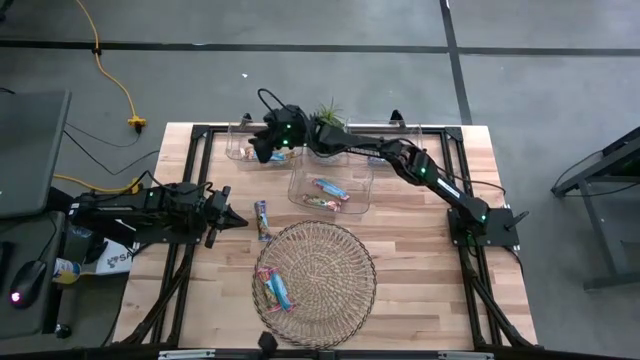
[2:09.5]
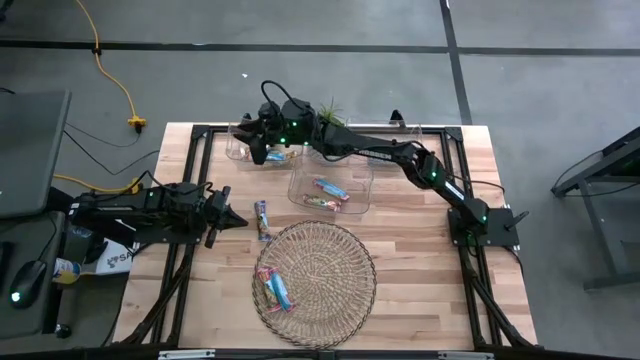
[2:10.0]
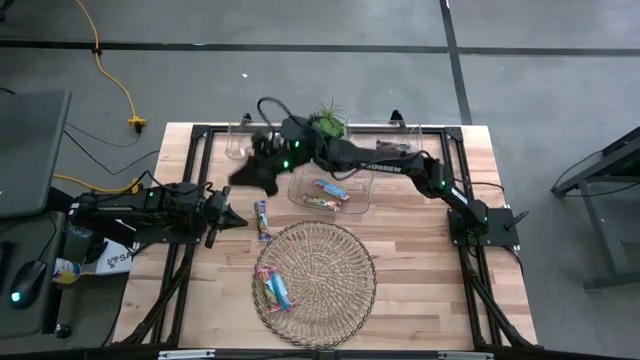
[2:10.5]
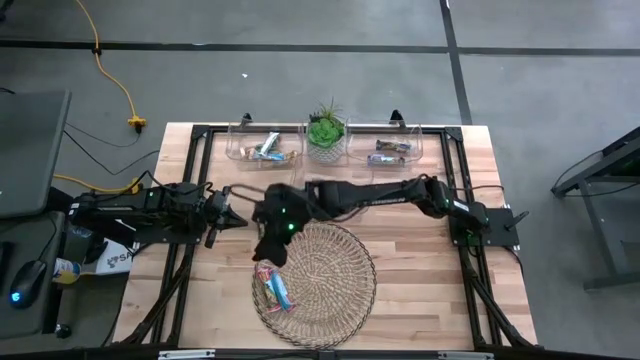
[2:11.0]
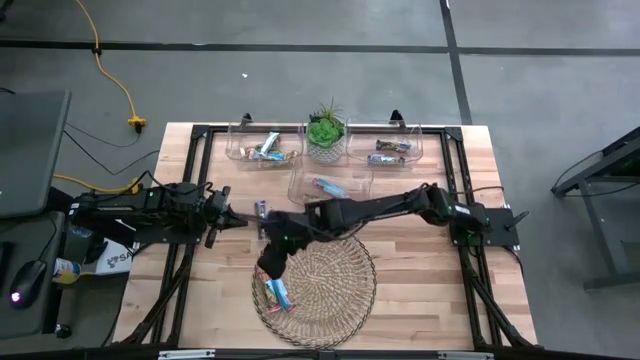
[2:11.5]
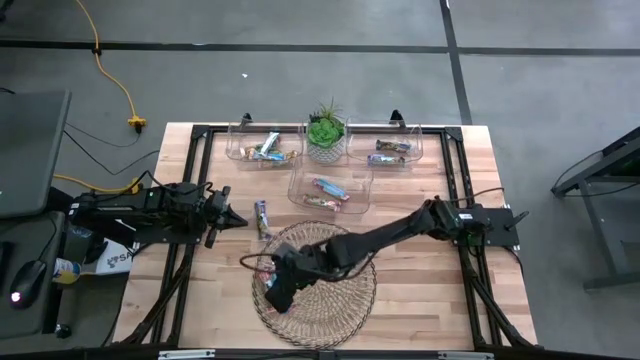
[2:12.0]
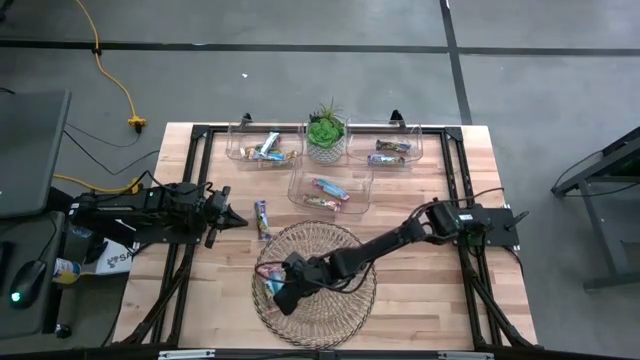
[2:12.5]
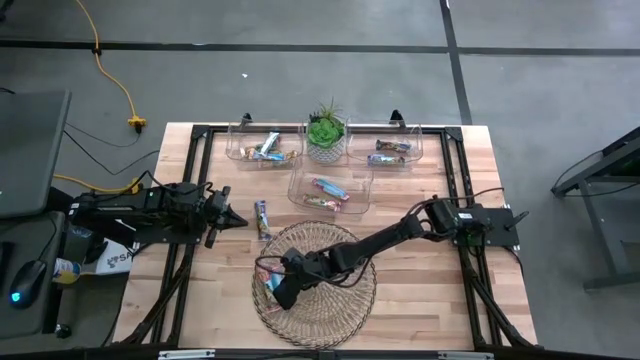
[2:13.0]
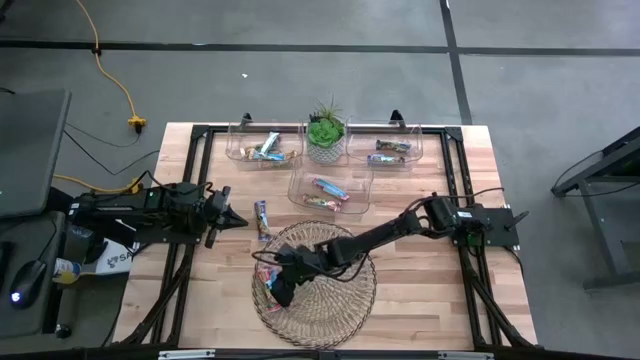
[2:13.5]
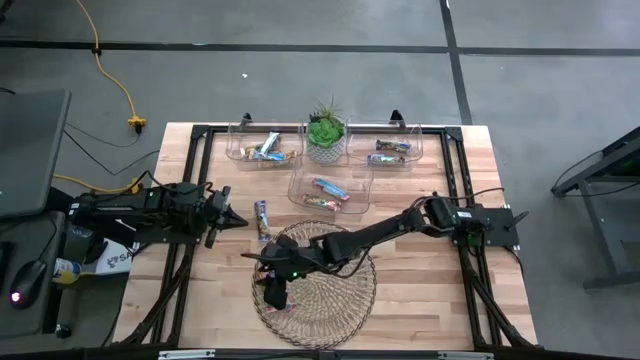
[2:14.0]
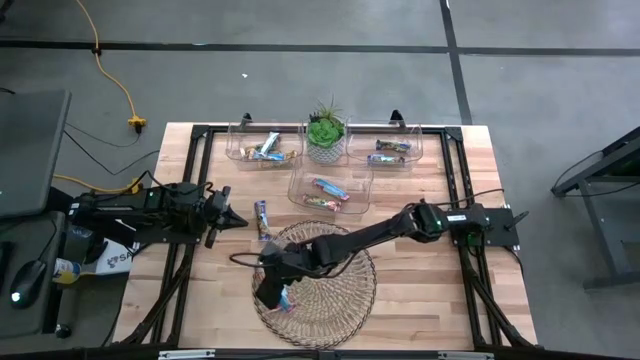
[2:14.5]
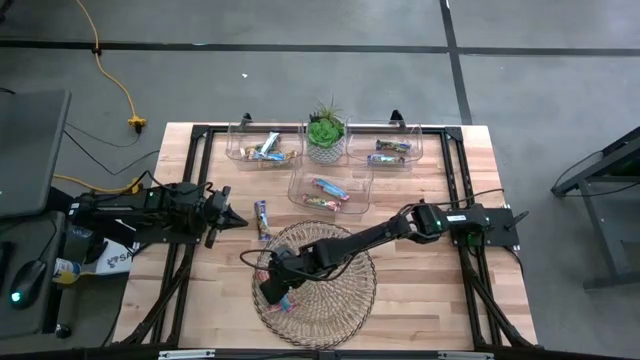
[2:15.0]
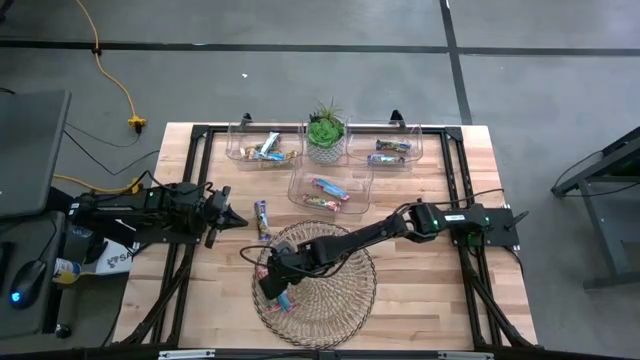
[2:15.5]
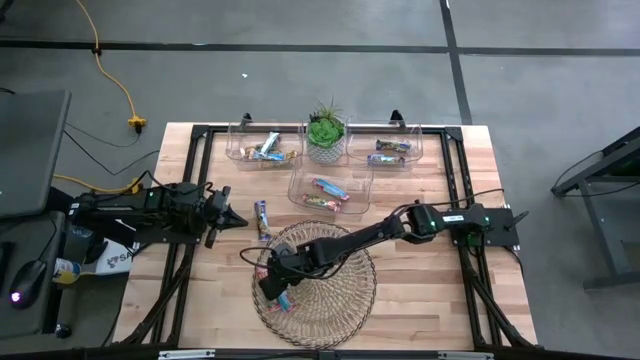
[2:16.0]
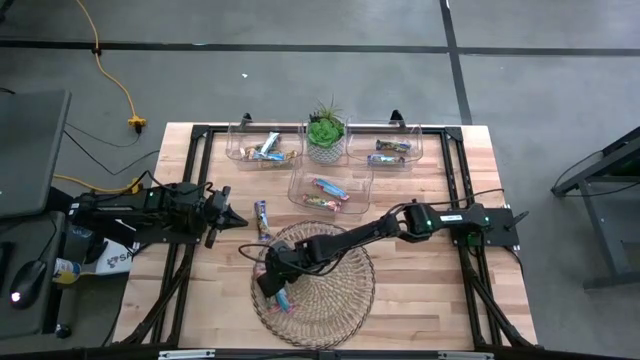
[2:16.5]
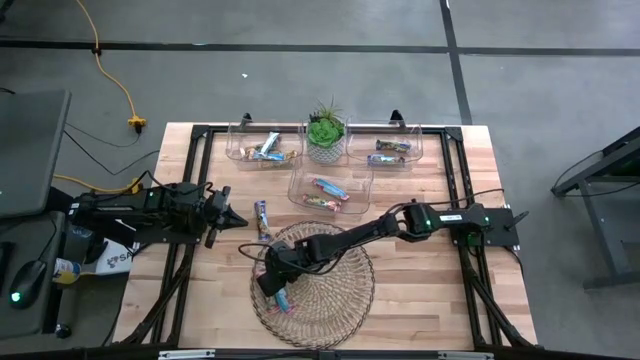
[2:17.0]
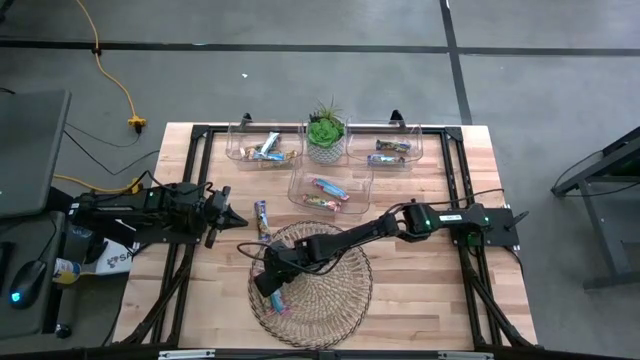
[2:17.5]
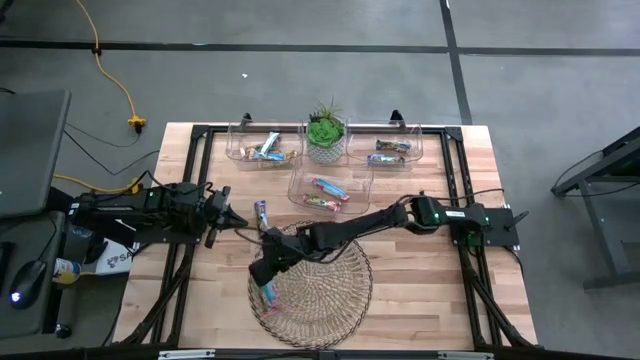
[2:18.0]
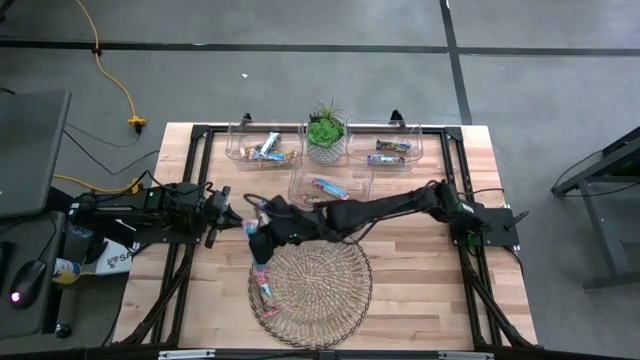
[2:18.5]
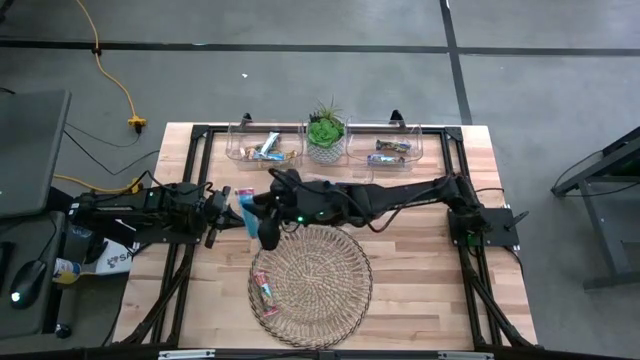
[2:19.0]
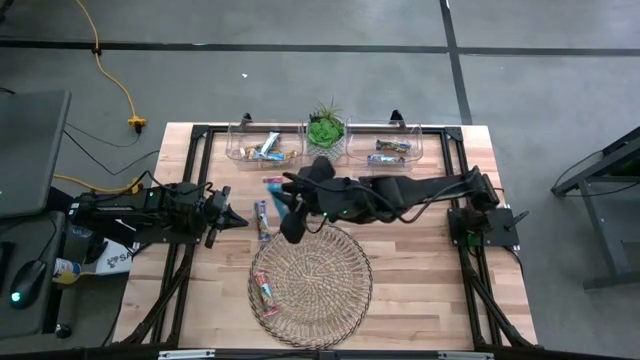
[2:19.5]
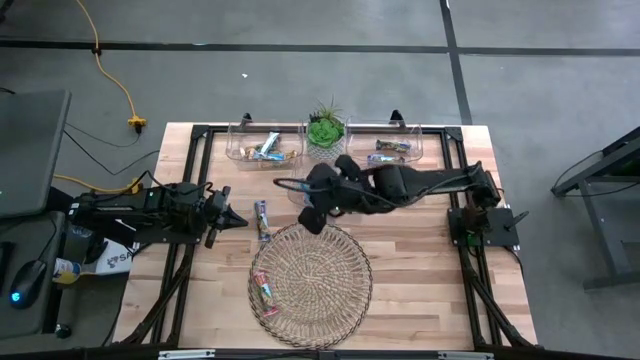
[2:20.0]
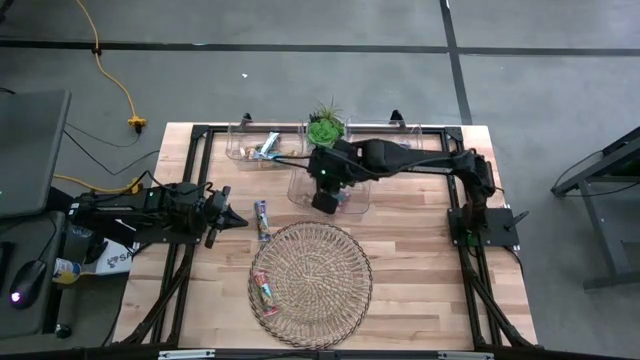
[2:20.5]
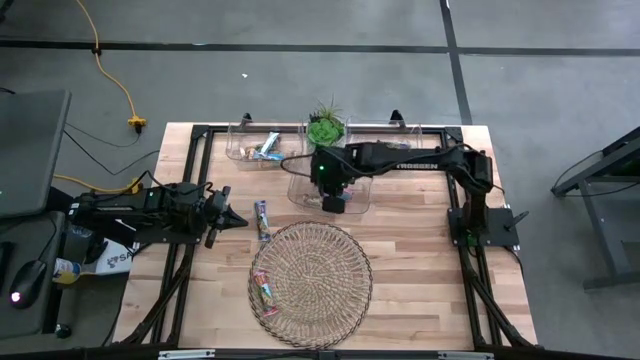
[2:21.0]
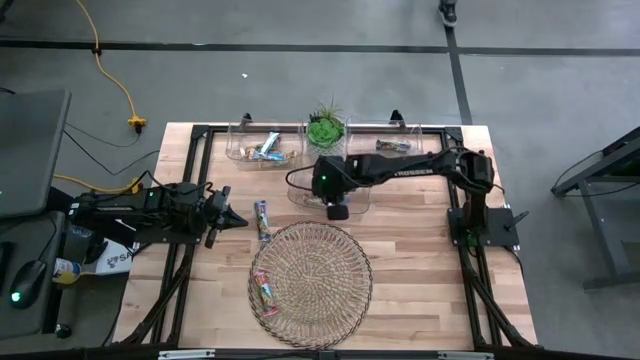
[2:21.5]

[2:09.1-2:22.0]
Task: Pick and place Granola Bars by type
Put the red granola bar into the bottom transparent bin

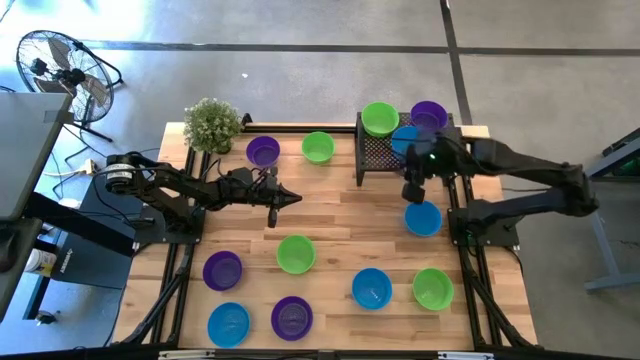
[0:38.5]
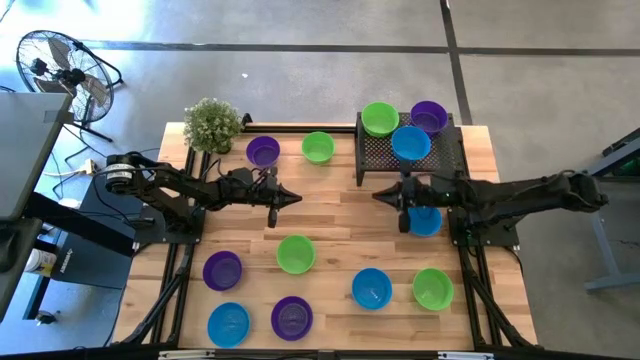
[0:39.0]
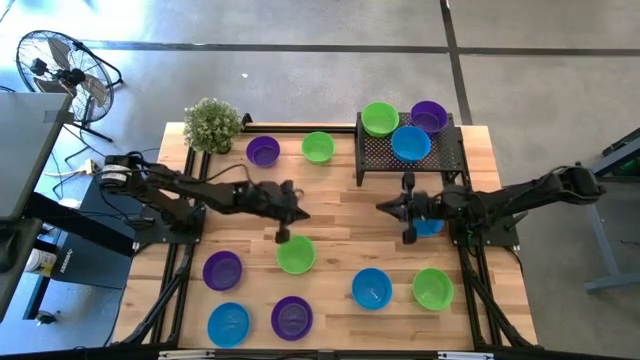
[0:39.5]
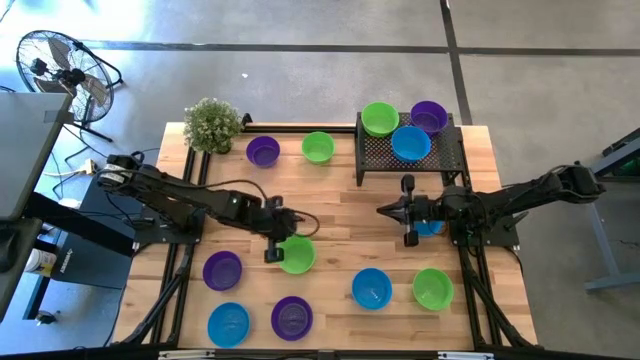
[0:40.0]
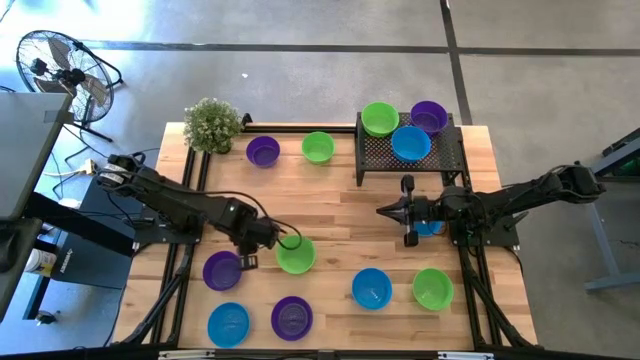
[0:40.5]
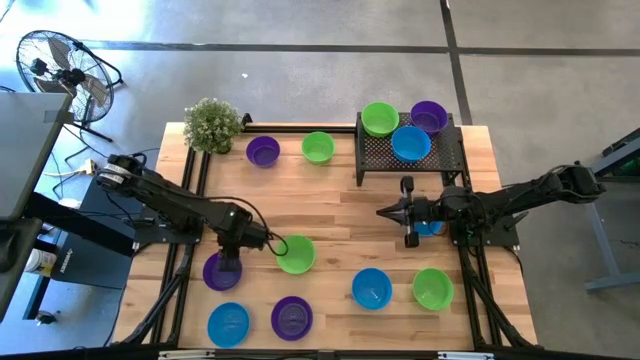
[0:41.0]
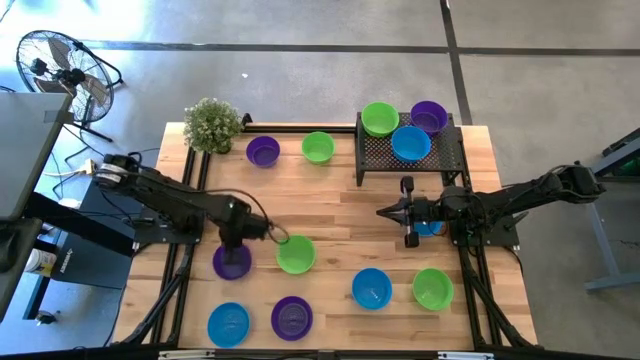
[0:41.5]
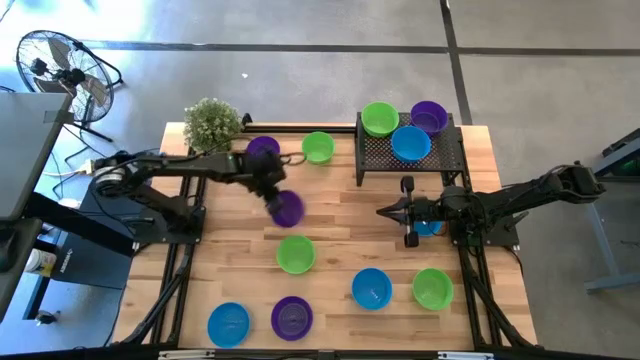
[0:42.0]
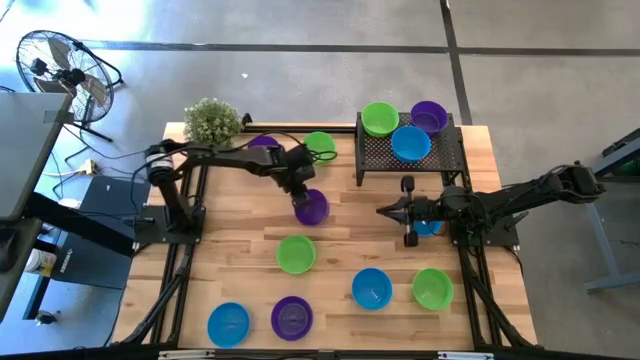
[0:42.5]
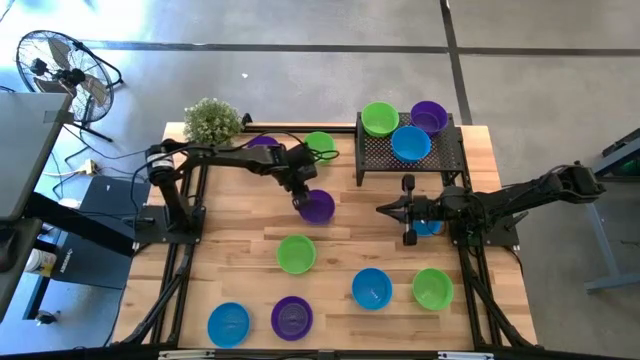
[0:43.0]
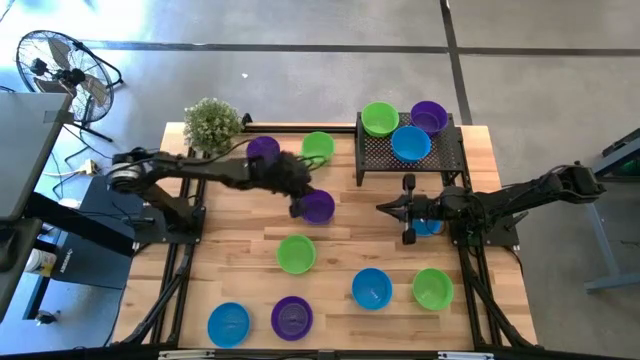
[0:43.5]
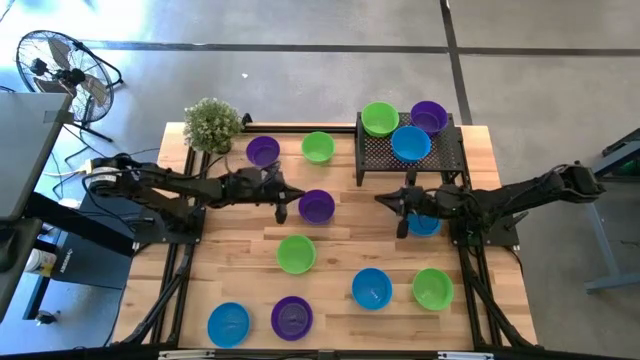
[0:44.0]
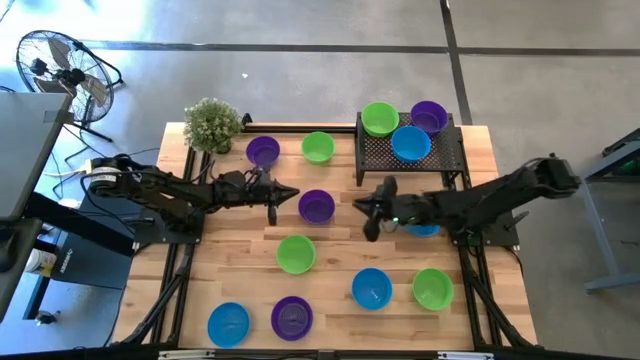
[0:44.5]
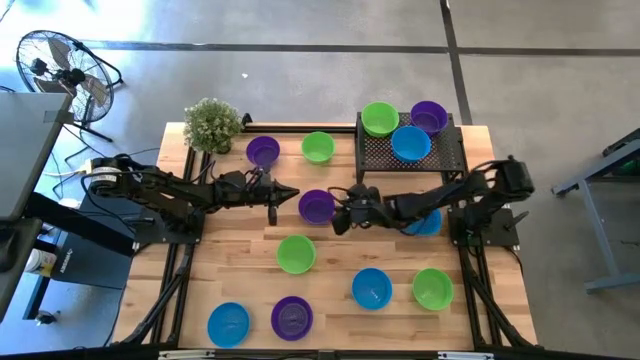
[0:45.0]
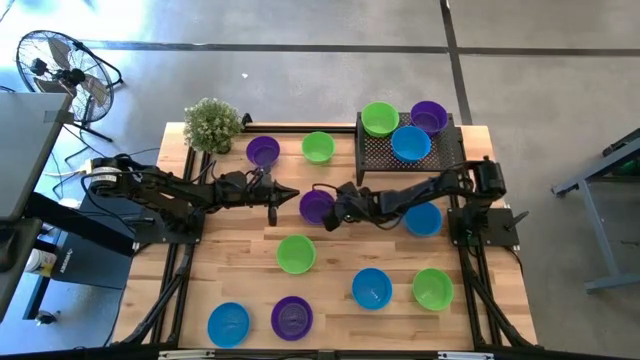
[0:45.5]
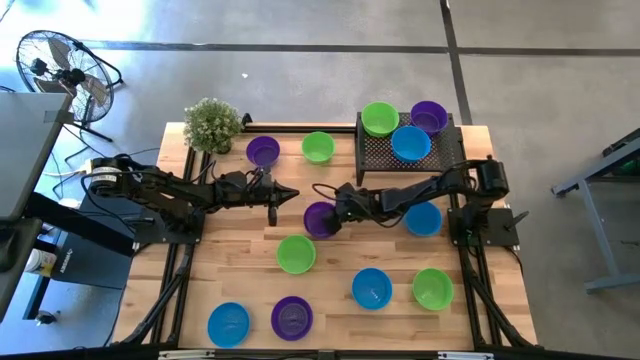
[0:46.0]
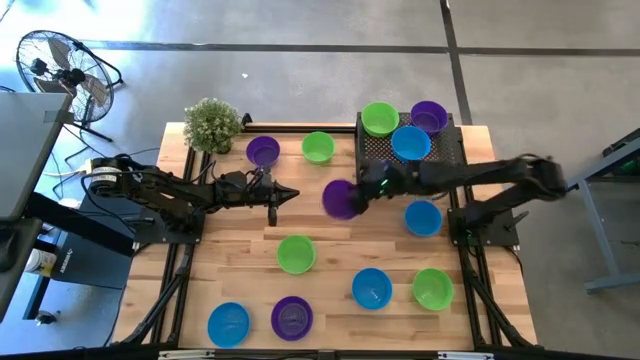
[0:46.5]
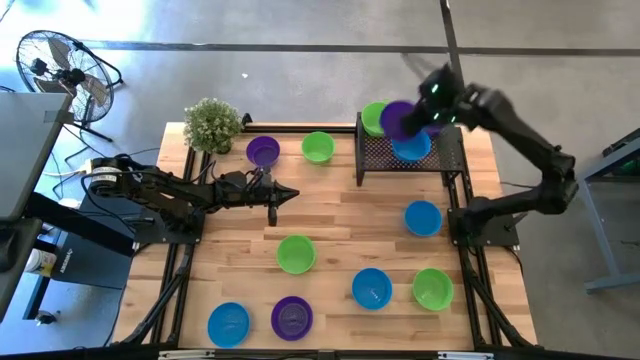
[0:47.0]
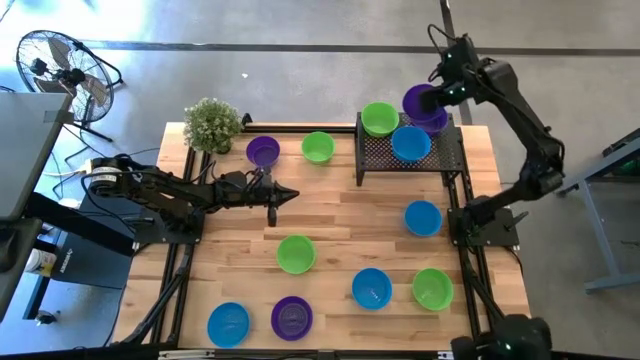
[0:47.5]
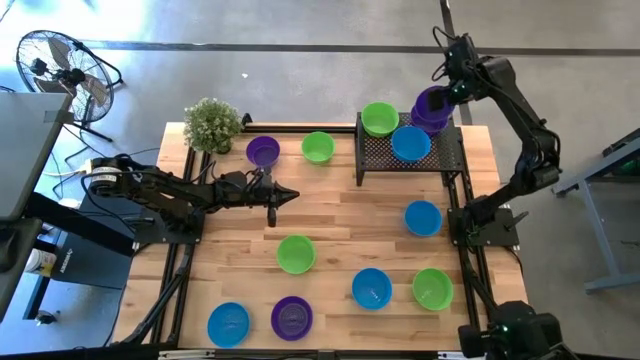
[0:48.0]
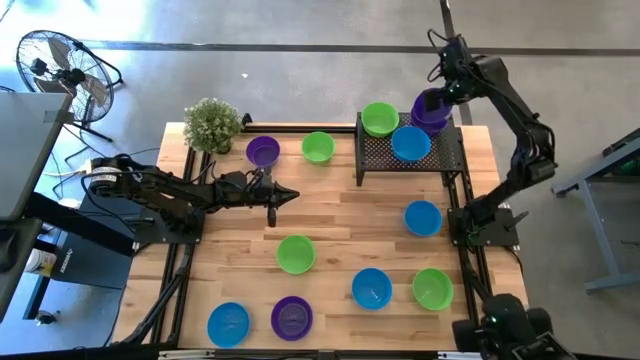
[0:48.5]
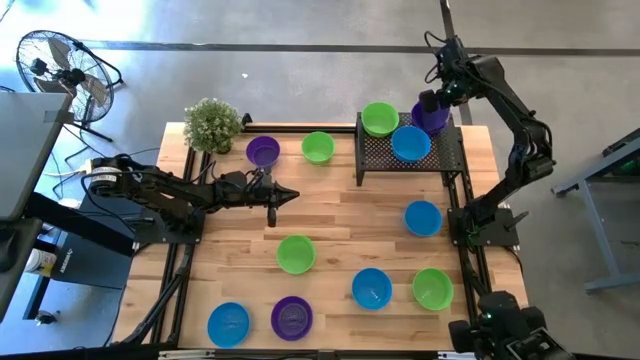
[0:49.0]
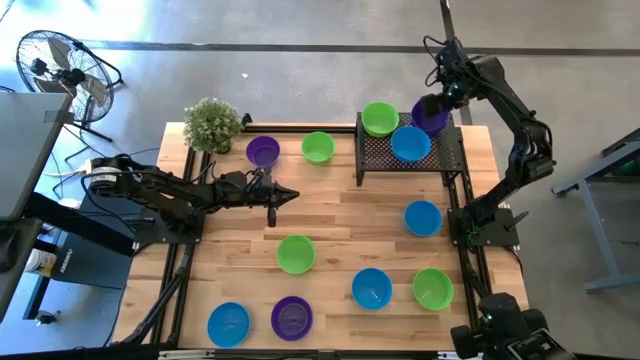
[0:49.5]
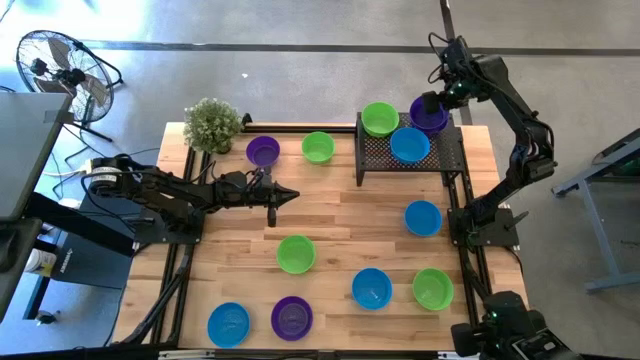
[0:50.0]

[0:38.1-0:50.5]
Task: Pick & Place Mini bowls
Stack the purple bowl on the other purple bowl on the shelf
